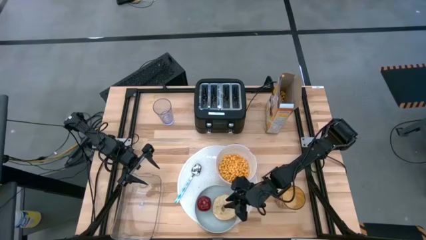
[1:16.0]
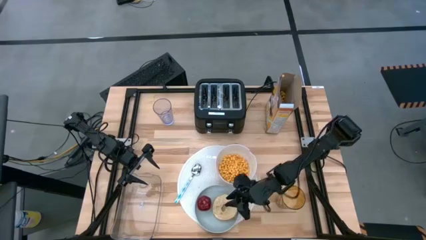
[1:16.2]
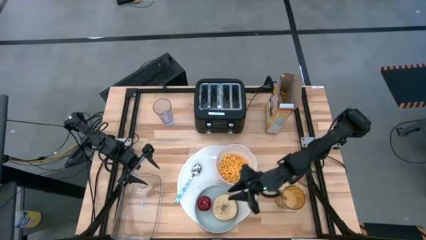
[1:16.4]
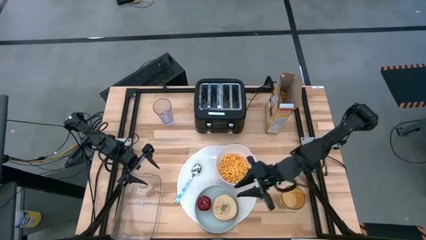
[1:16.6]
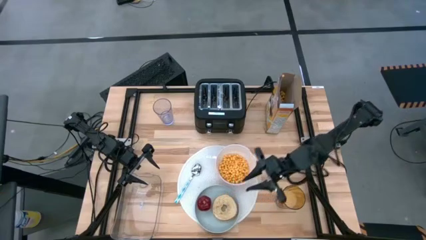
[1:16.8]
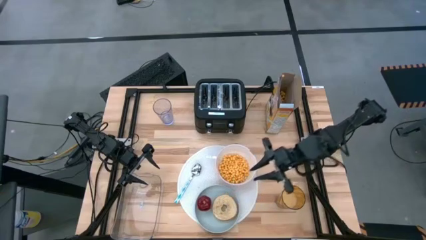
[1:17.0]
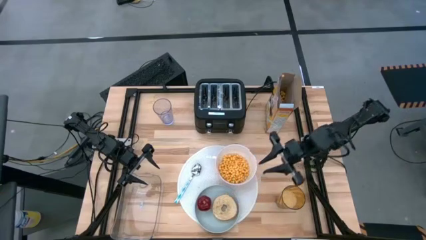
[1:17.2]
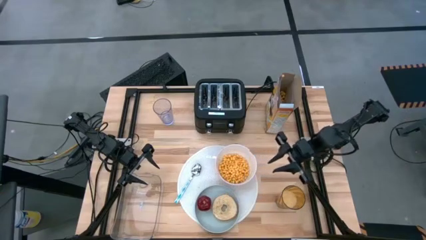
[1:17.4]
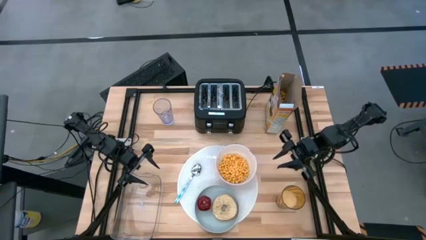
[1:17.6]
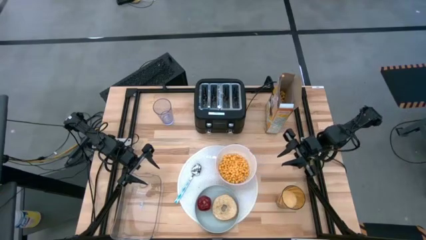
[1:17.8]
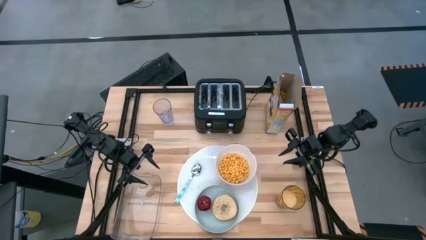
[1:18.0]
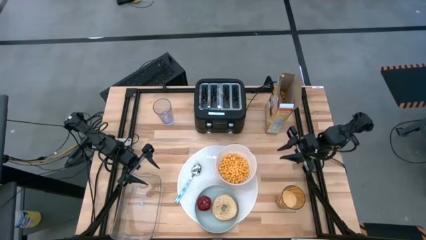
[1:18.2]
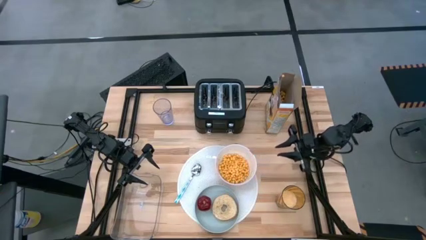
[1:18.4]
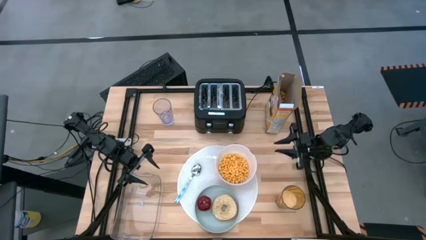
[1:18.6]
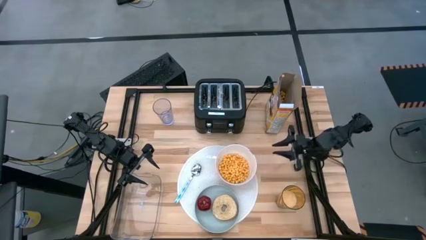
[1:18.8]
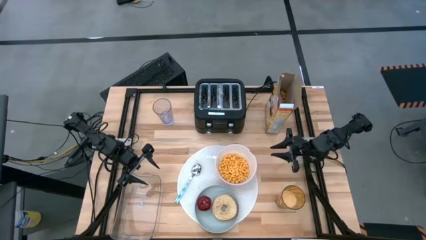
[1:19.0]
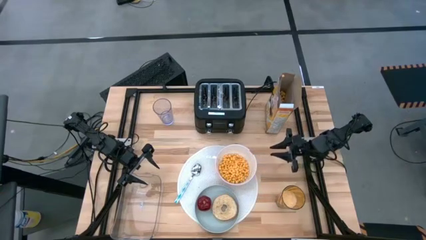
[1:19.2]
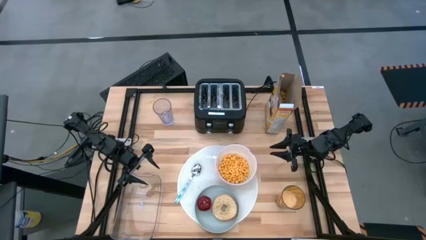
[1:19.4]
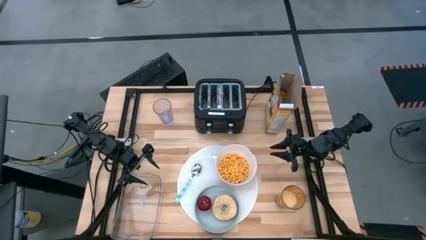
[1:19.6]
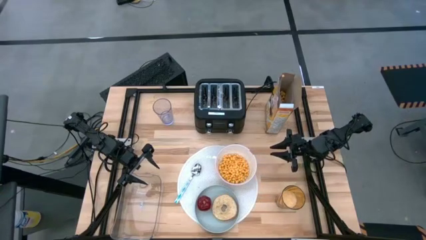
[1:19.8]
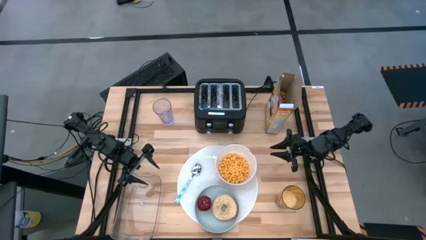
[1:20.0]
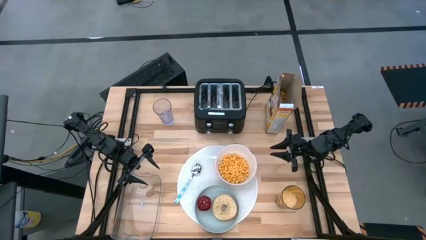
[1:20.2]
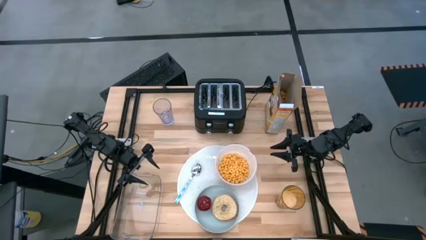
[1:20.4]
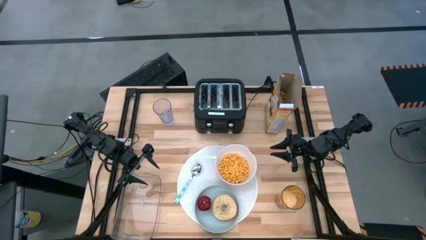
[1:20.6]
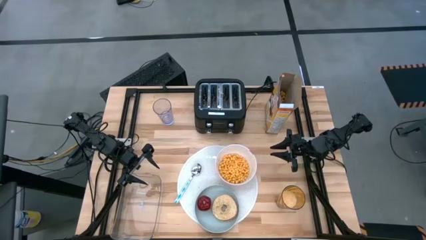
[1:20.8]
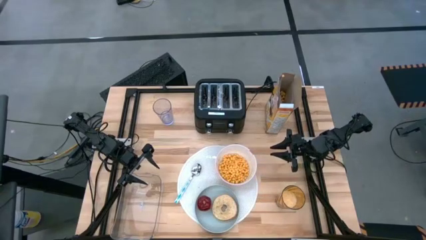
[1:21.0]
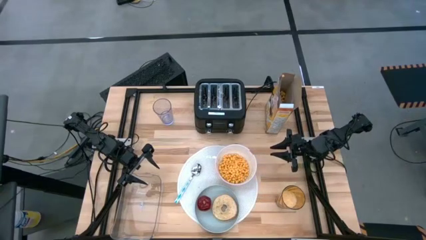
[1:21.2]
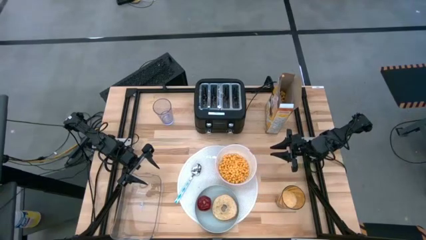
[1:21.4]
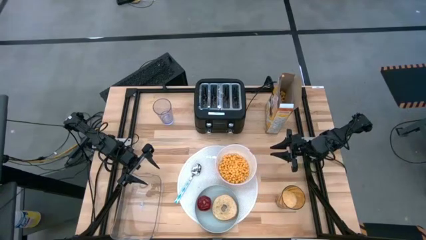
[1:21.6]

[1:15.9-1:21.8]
Task: Arrange a breakfast setting
Return to Home Position

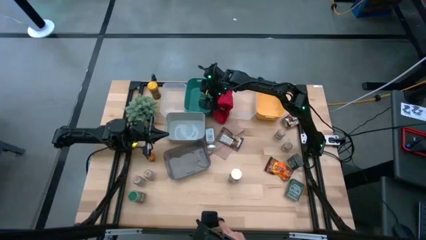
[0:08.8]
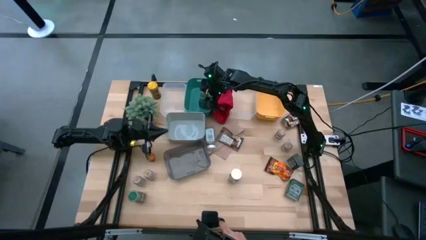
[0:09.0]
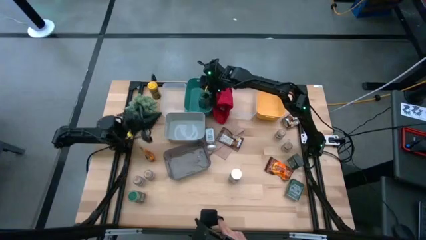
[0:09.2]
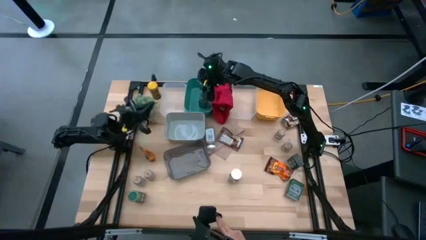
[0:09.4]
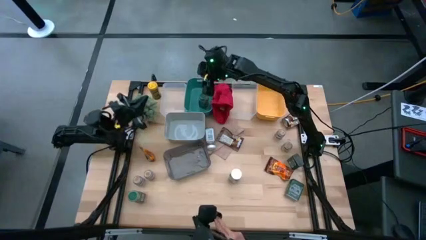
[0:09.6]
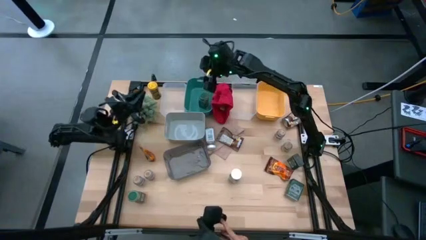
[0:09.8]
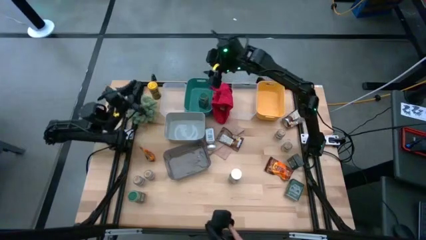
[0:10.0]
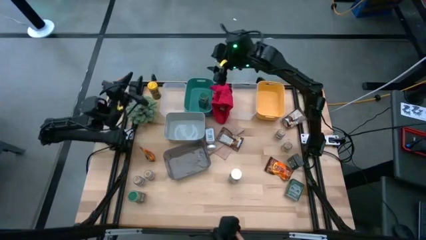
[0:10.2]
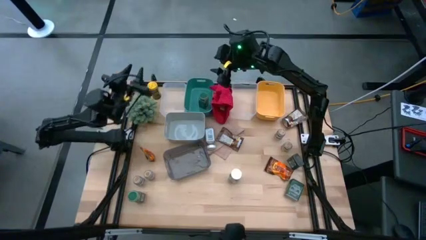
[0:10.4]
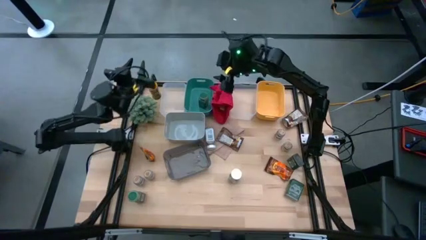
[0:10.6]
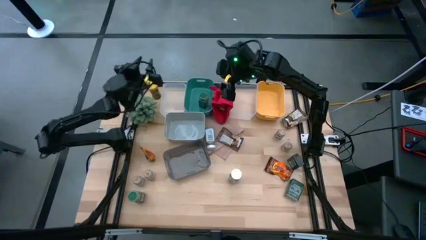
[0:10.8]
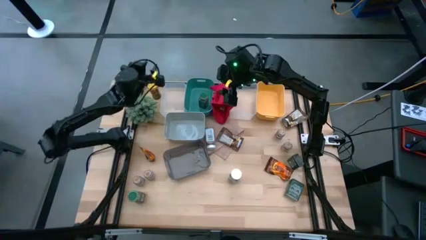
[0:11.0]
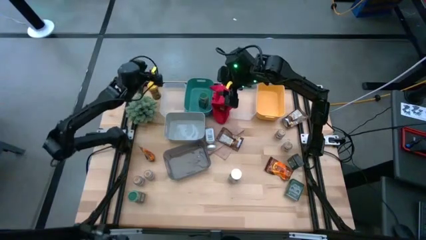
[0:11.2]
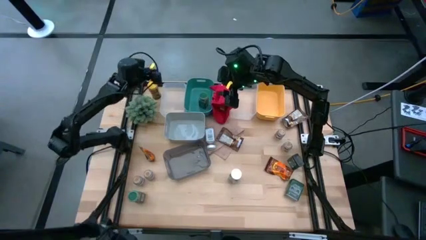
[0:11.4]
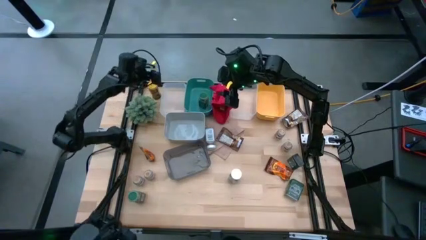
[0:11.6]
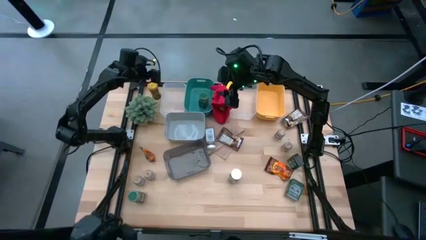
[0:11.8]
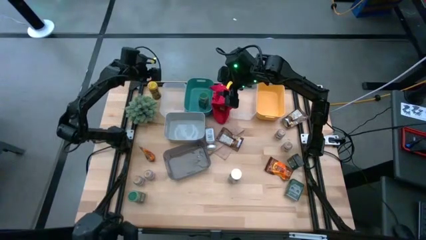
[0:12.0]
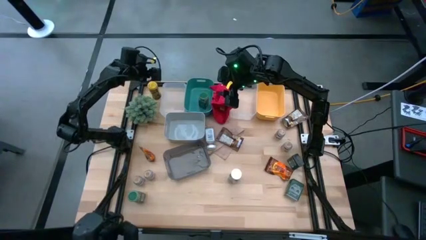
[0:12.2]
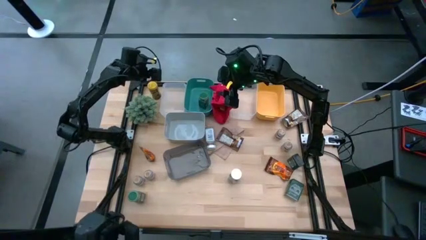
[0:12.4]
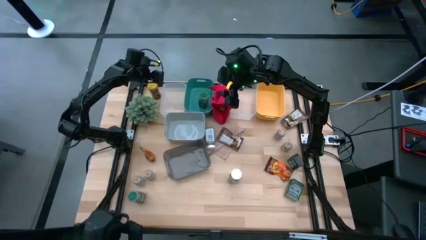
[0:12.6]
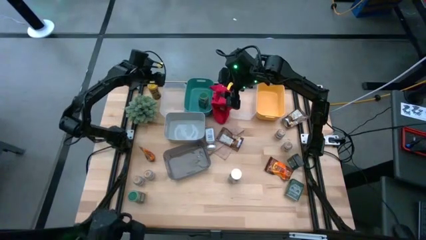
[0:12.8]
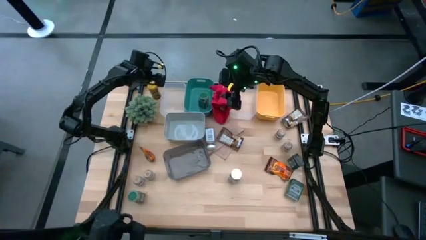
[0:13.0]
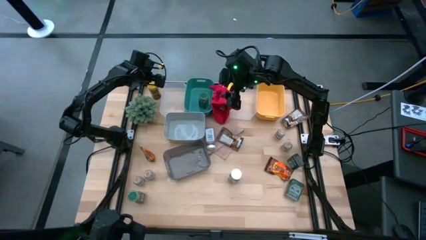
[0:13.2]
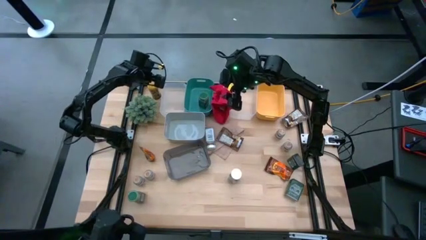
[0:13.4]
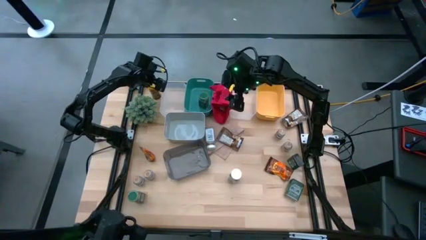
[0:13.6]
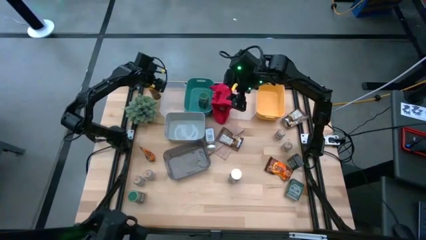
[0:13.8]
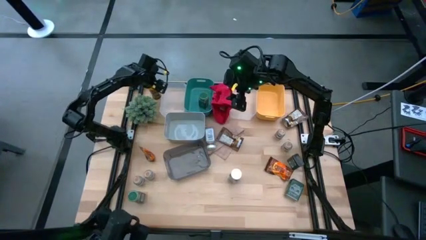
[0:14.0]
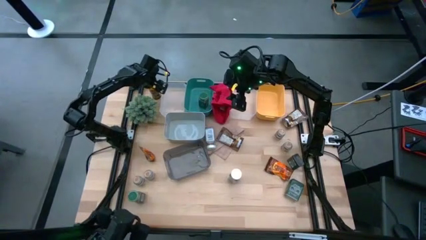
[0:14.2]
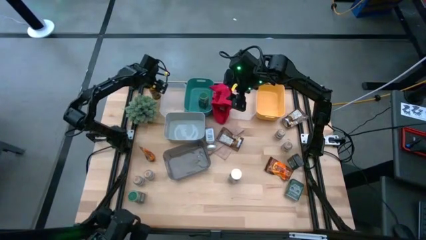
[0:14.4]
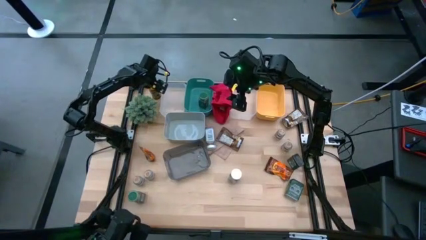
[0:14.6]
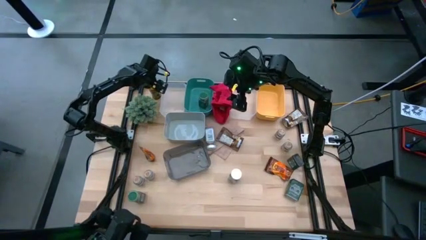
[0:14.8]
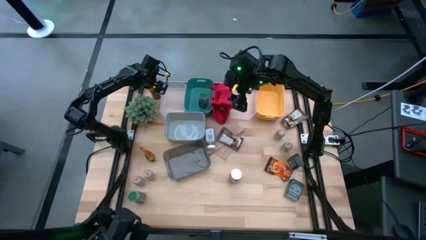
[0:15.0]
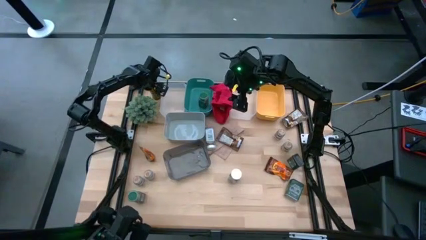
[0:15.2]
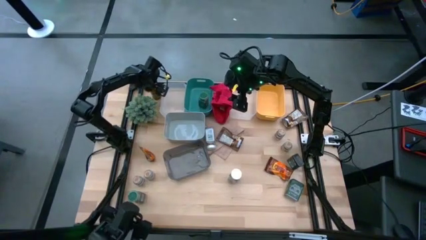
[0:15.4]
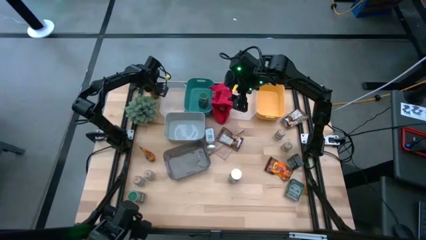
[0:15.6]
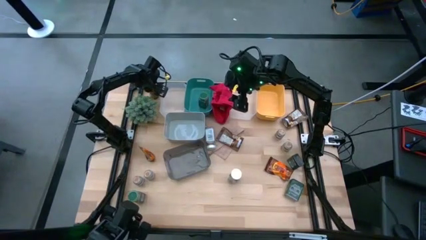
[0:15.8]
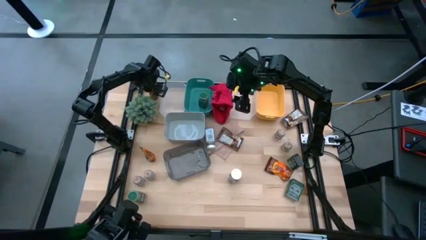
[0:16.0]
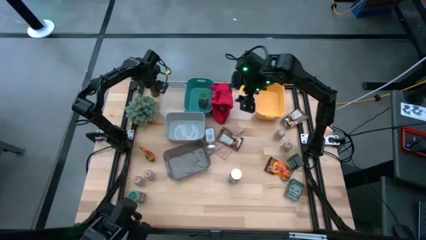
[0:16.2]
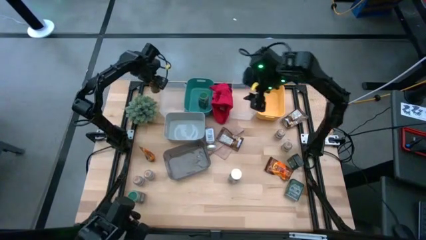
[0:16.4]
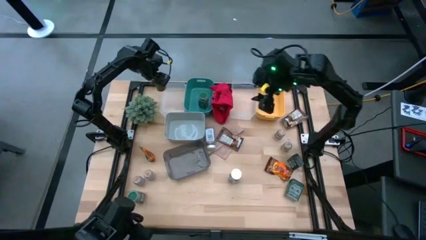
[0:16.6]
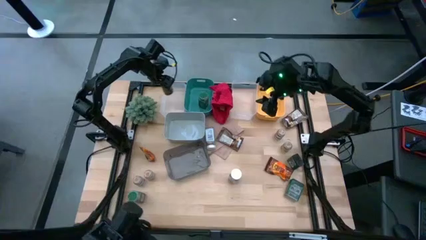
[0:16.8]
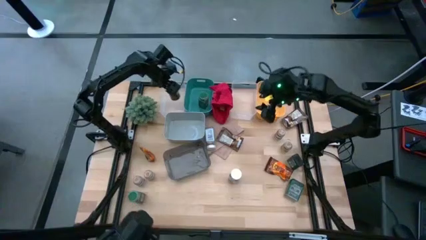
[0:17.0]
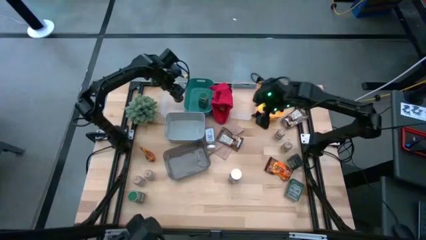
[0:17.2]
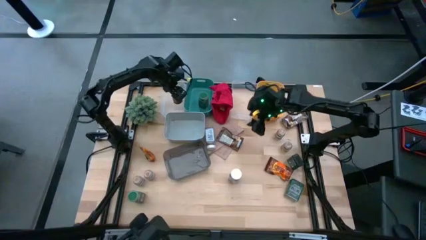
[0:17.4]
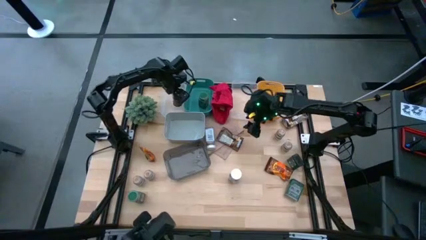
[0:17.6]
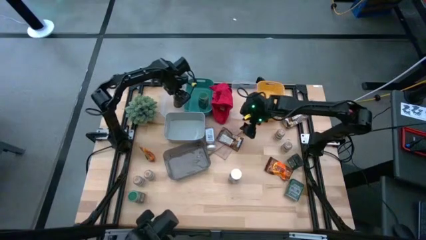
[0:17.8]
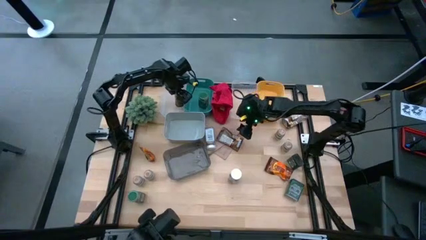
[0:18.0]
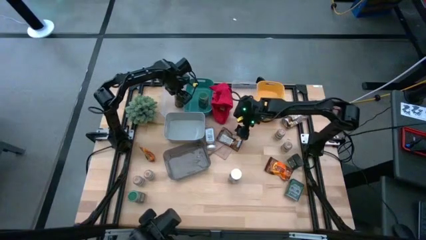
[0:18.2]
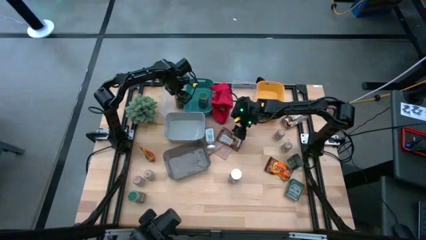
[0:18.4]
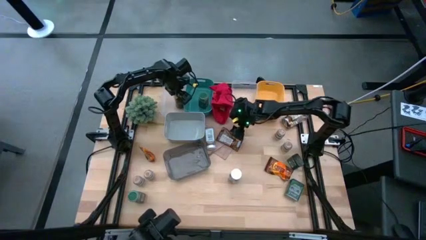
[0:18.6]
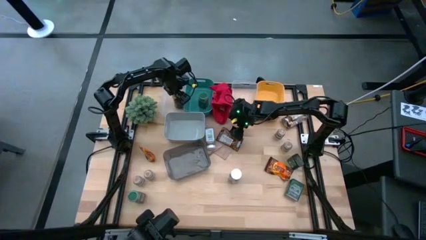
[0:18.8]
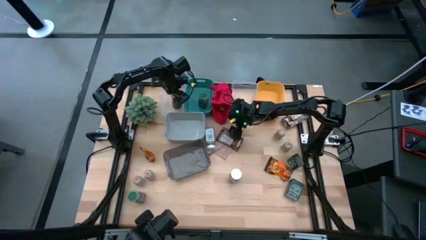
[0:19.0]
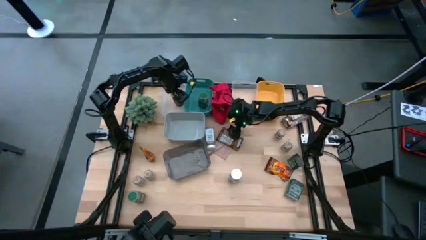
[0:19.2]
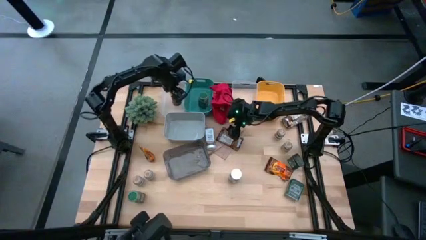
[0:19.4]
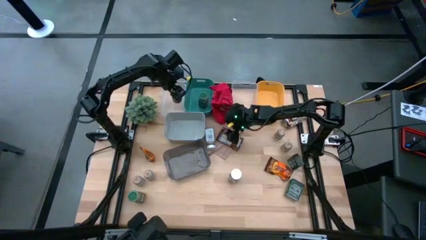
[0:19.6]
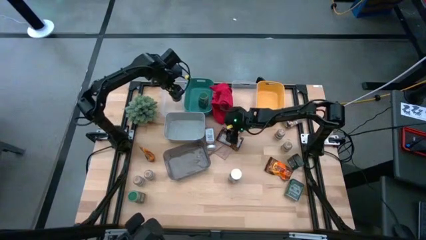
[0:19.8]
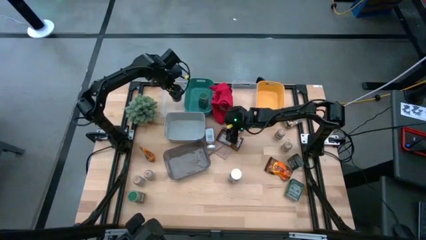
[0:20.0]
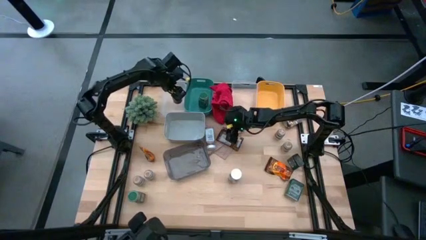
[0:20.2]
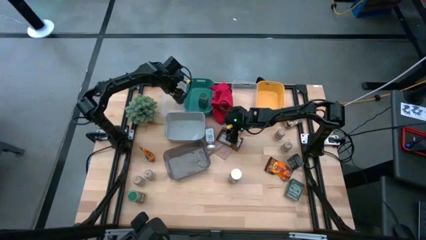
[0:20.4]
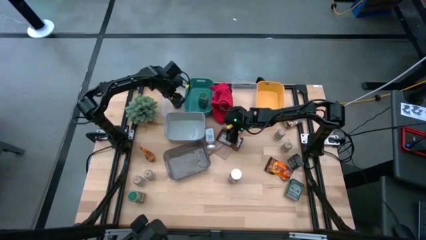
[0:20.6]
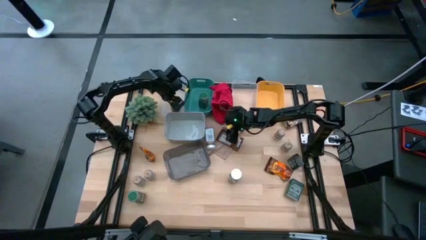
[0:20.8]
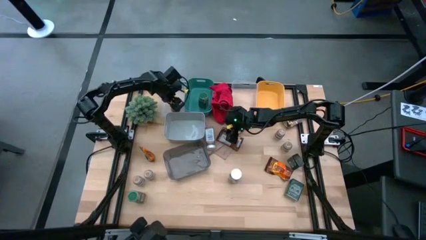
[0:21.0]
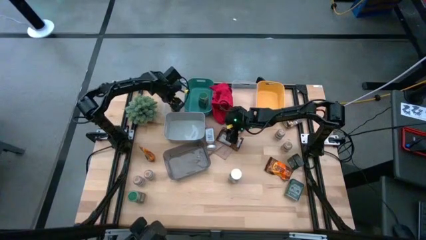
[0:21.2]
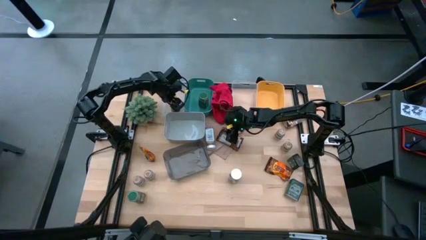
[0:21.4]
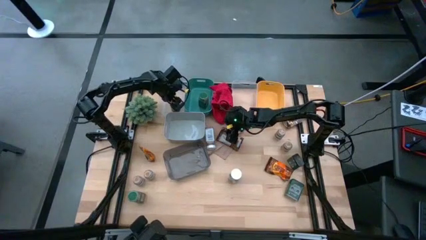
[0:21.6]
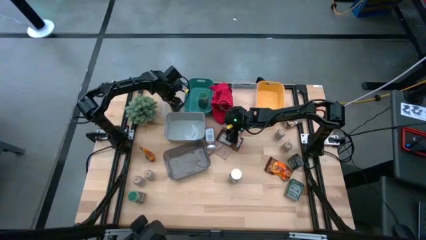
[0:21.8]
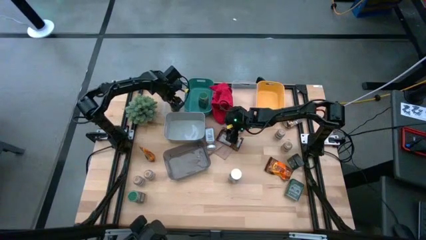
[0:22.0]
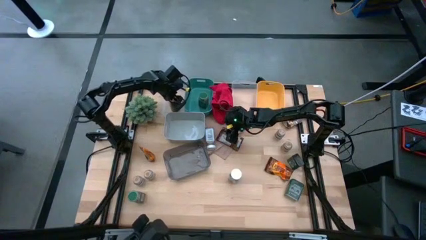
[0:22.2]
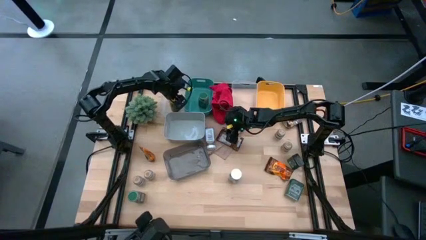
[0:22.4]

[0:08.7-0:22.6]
Task: Sort spices by type
Put the yellow seasoning bottle into the left transparent bin
